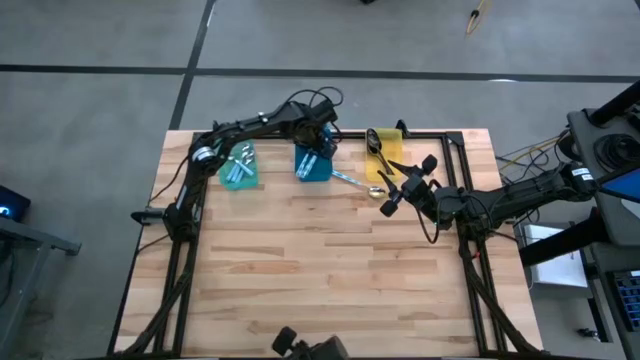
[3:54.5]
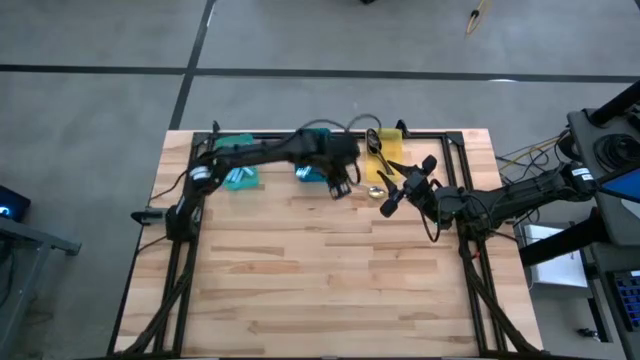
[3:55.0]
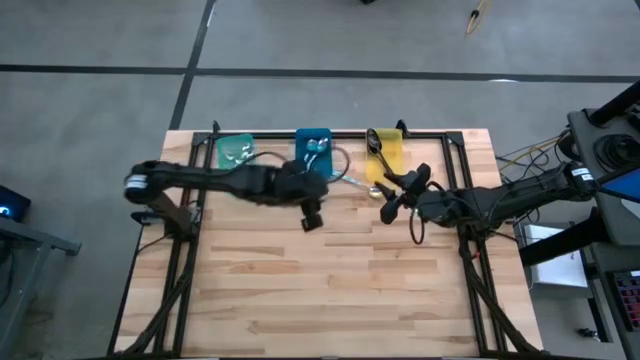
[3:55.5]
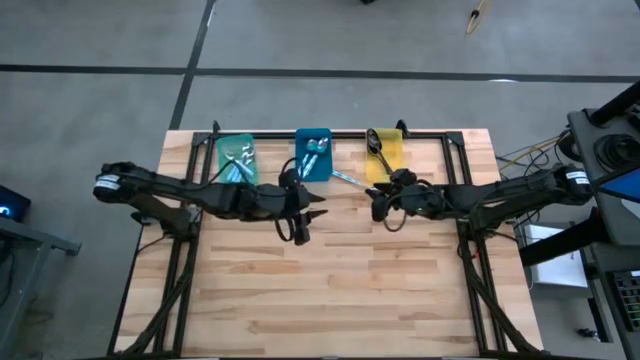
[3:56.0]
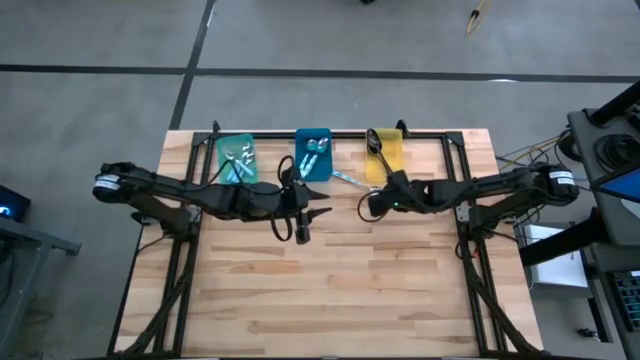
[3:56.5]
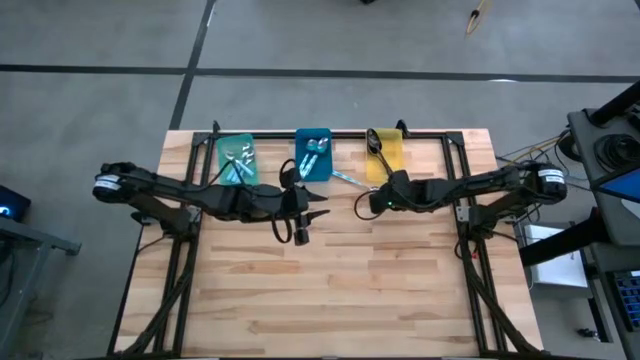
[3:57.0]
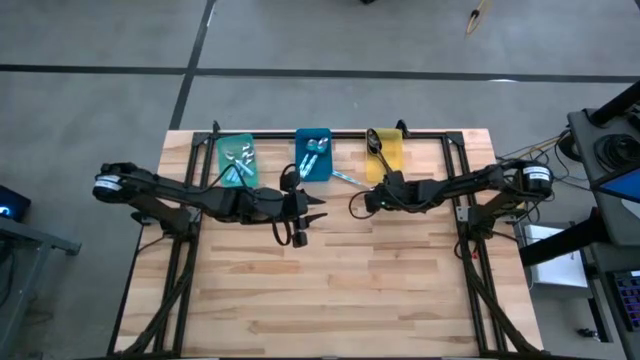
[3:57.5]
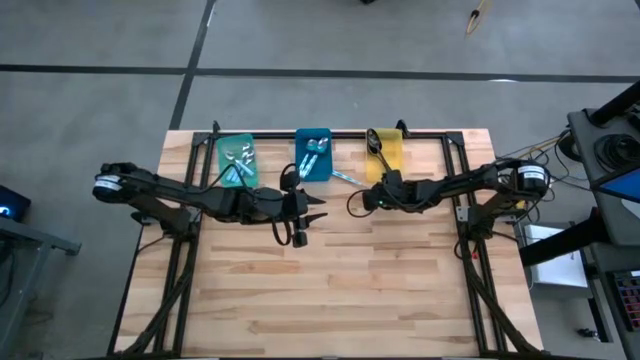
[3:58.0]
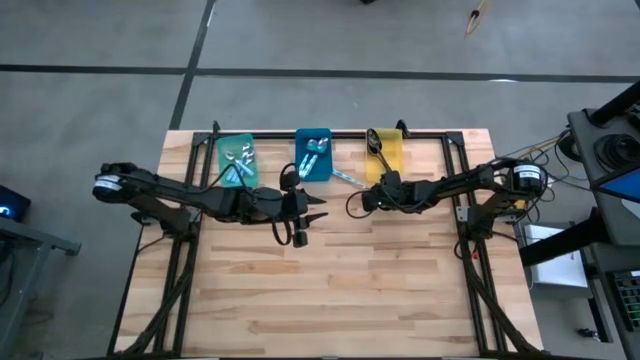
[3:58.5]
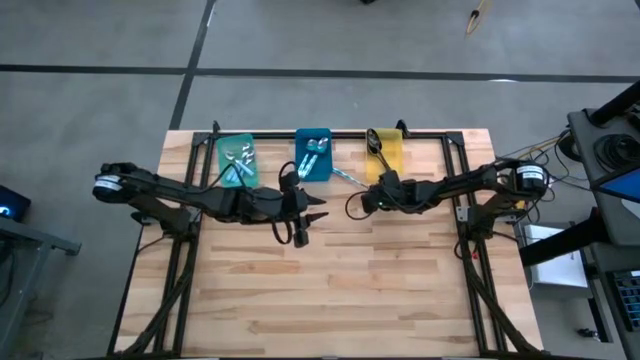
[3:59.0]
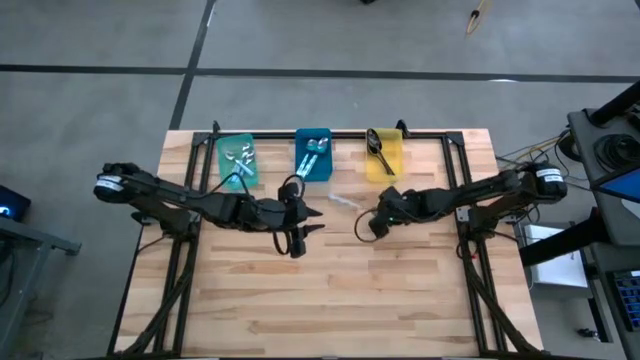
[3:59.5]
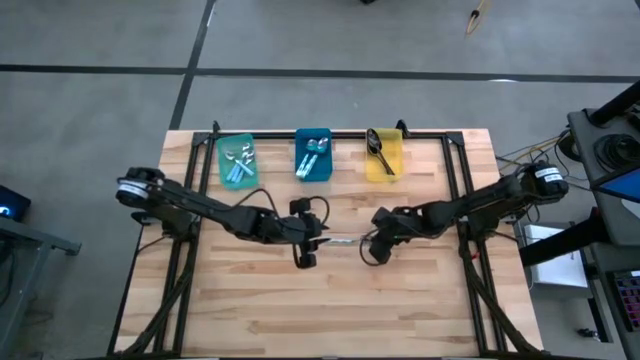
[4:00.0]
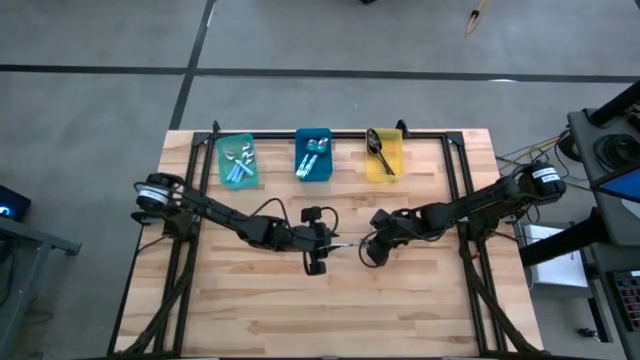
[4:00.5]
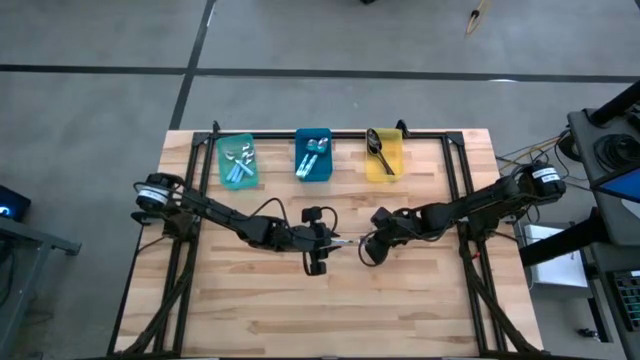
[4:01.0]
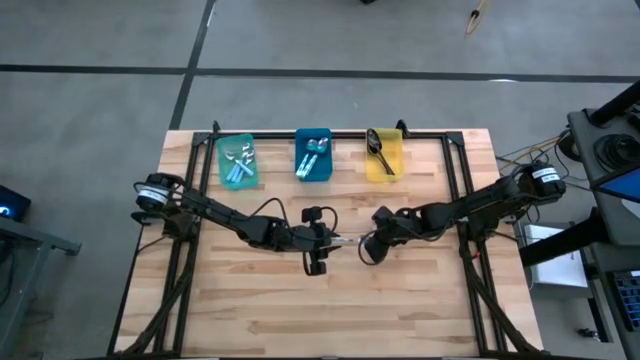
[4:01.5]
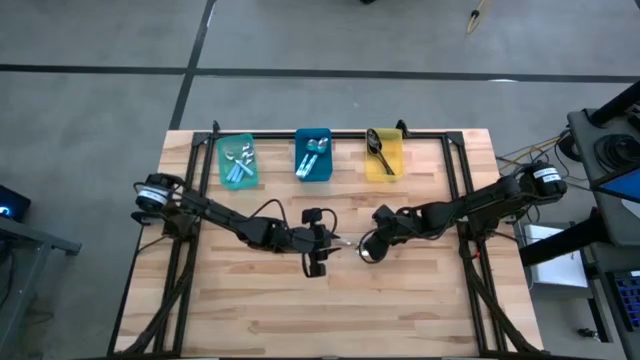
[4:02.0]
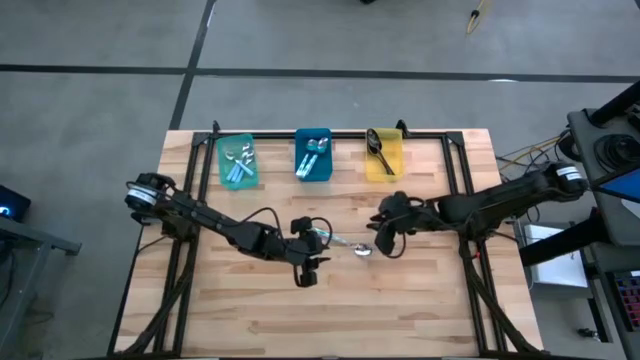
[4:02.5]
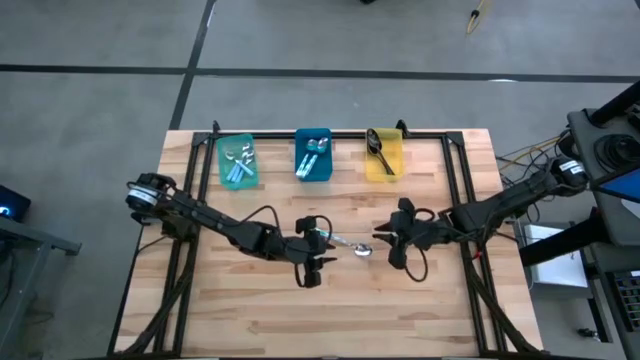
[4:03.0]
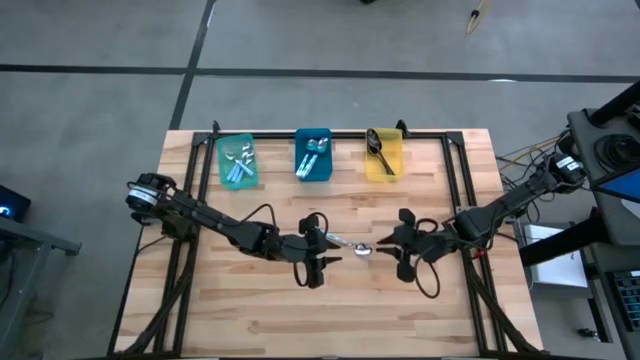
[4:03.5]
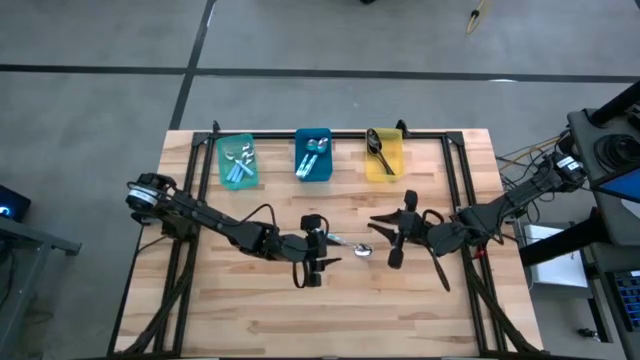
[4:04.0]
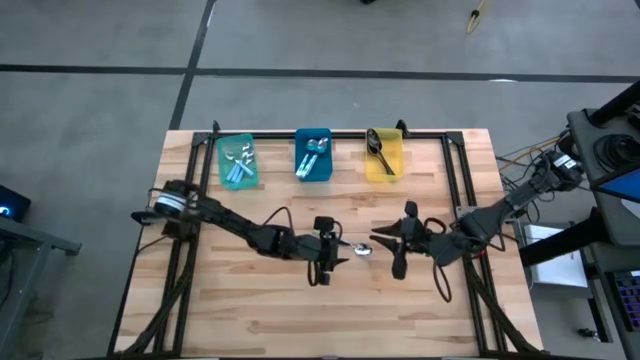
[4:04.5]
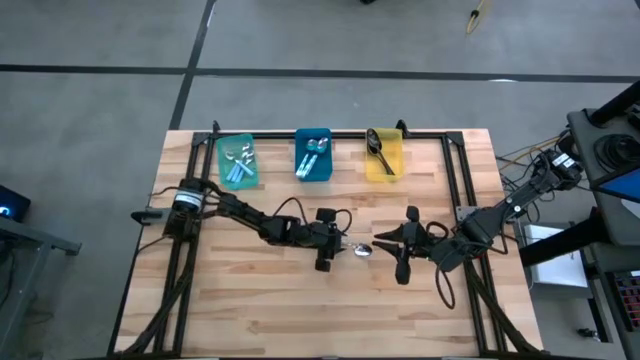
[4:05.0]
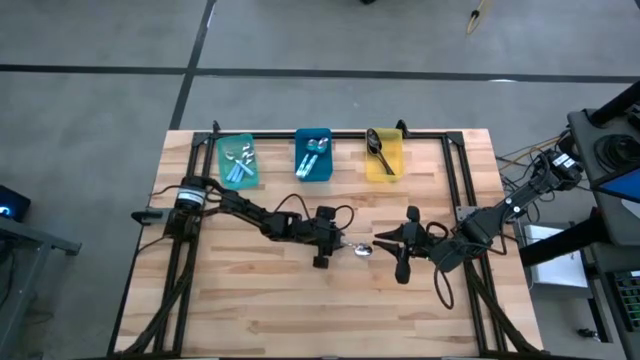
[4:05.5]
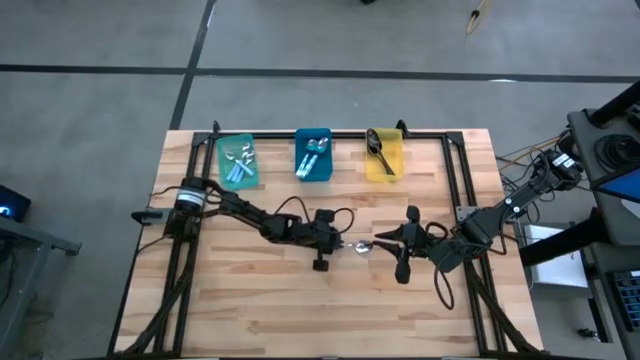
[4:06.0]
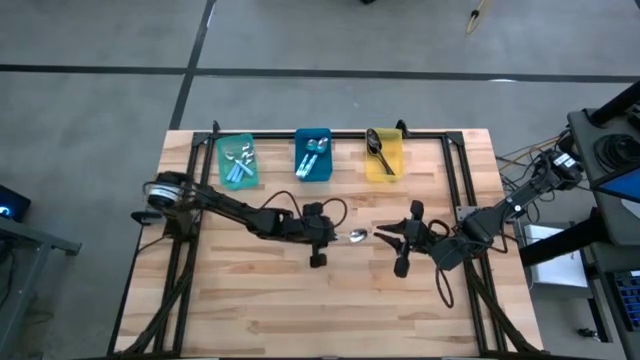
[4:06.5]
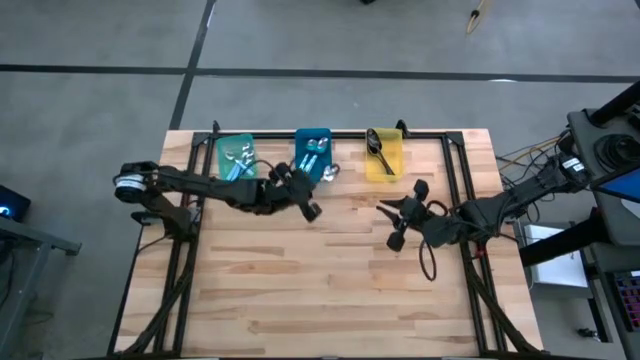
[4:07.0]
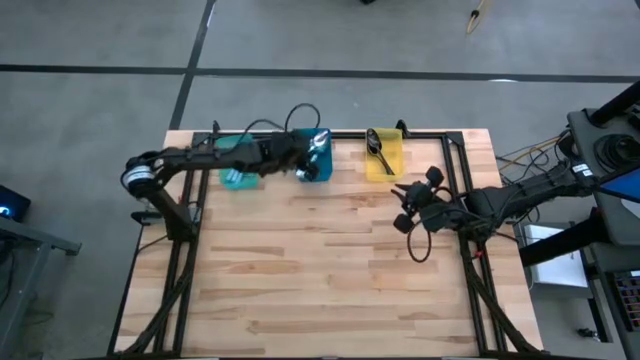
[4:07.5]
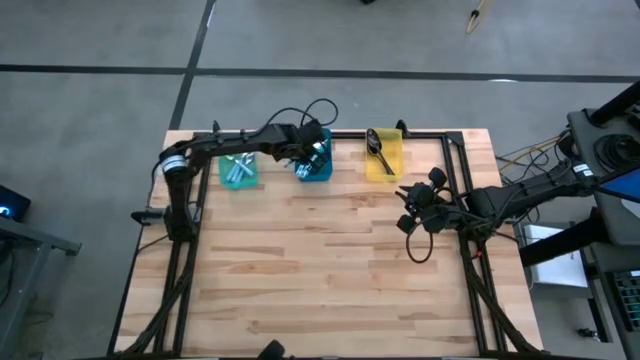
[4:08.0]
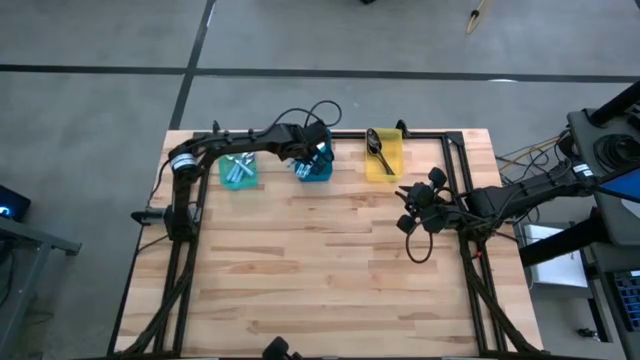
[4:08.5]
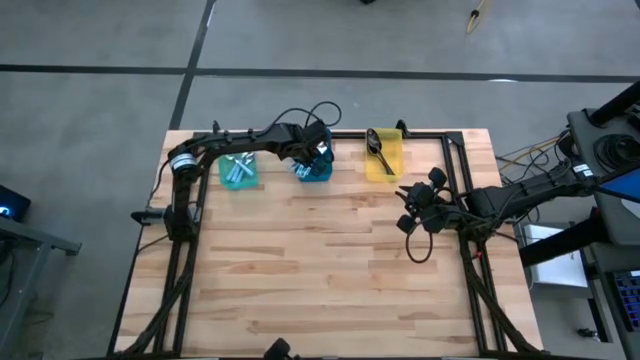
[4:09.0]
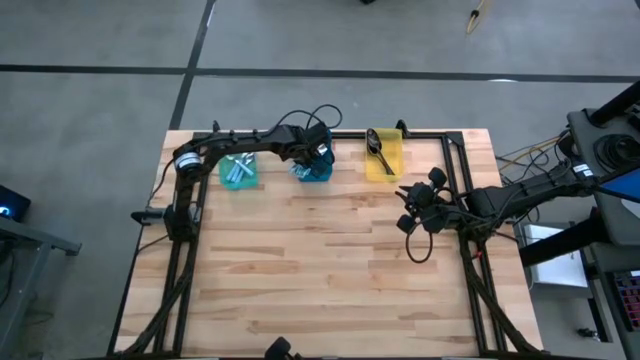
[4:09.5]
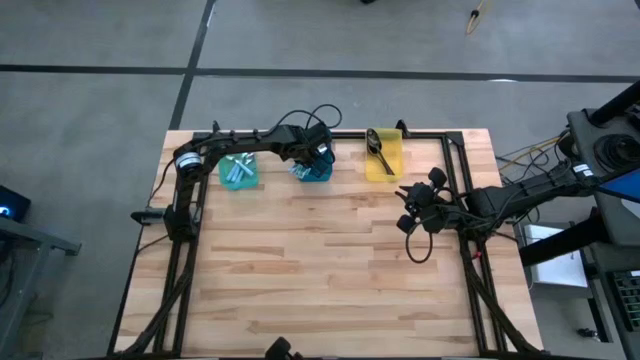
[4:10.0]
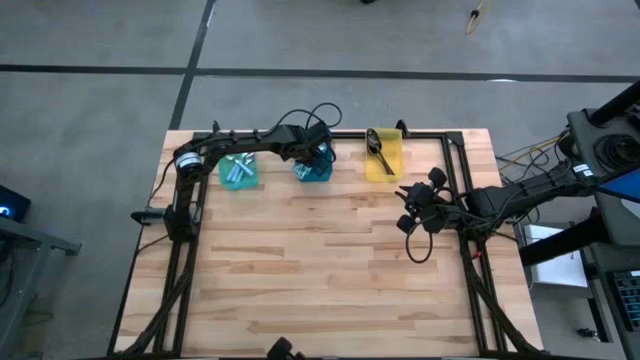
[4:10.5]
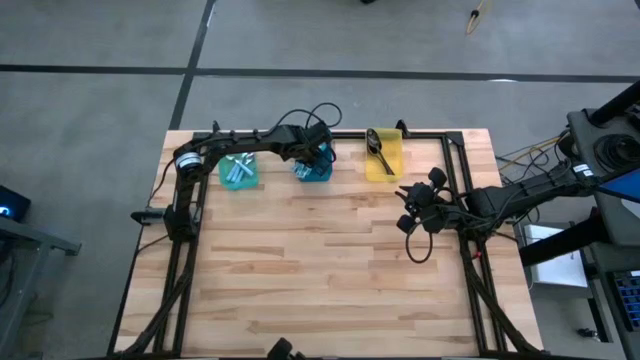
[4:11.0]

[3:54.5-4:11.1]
Task: Sort silverware by color (type)
Put the white-blue spoon into the blue bin

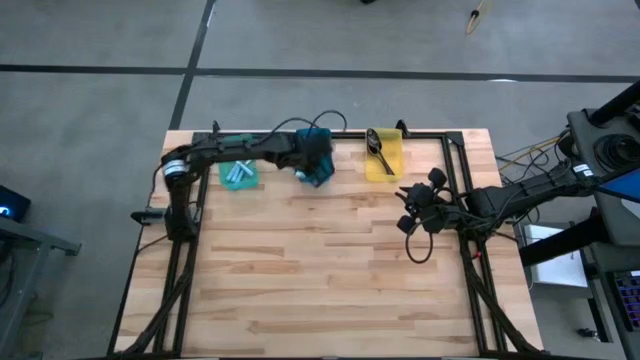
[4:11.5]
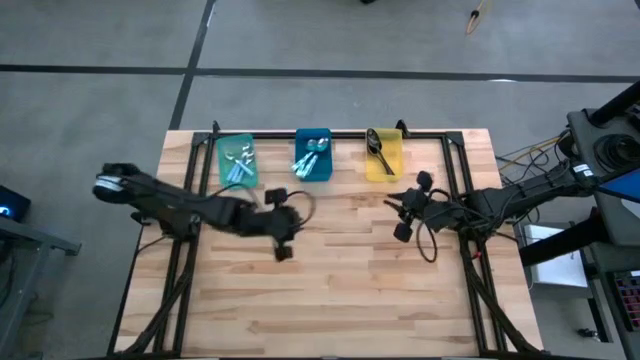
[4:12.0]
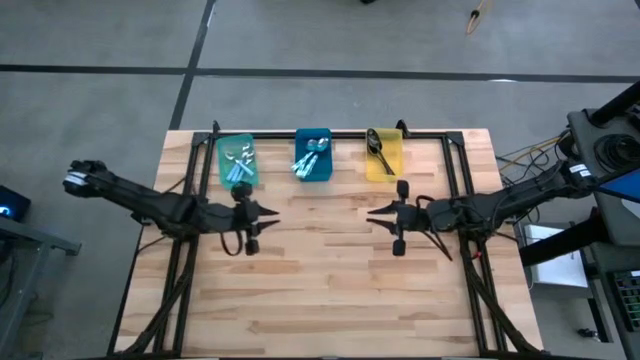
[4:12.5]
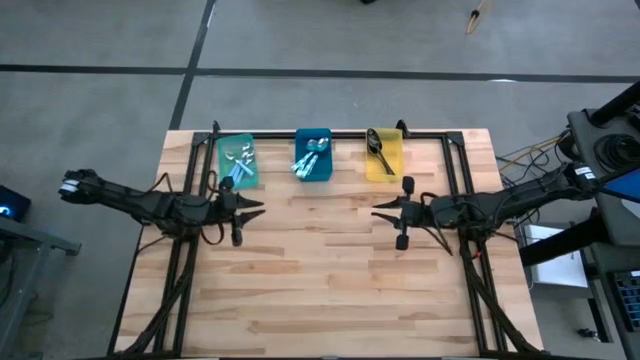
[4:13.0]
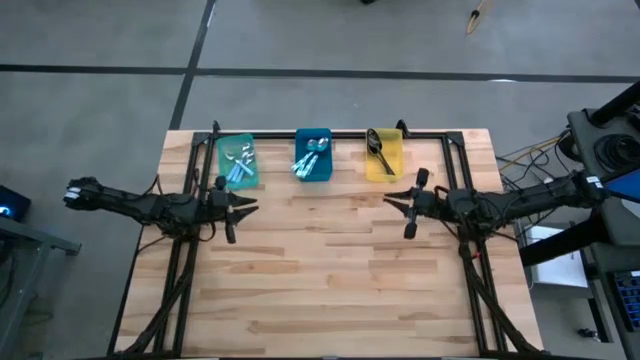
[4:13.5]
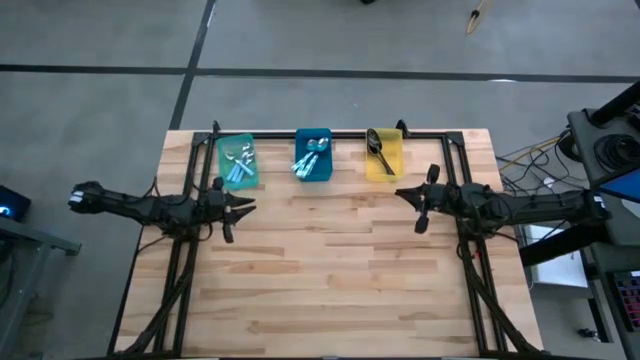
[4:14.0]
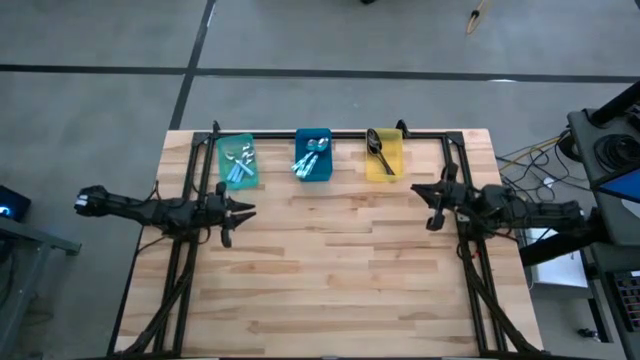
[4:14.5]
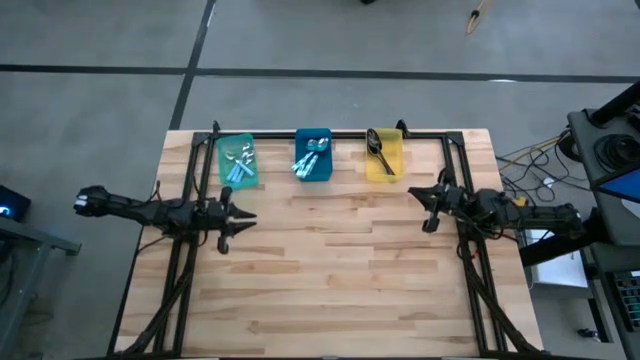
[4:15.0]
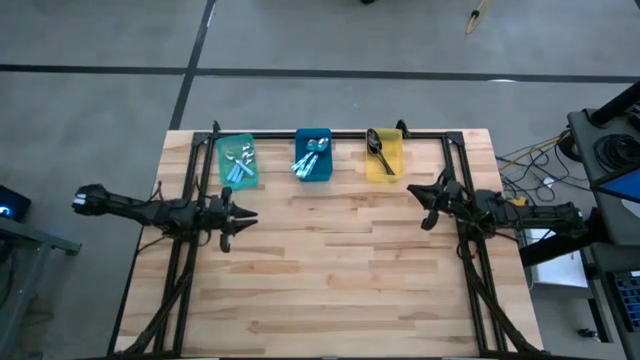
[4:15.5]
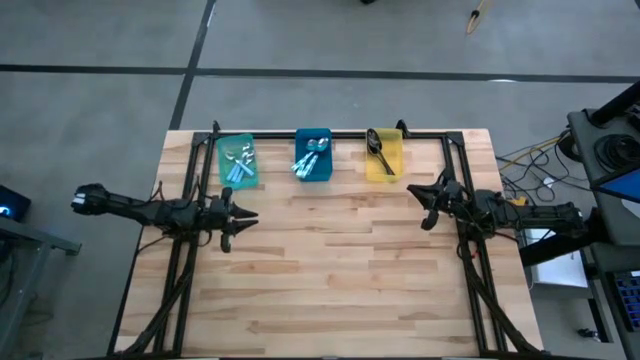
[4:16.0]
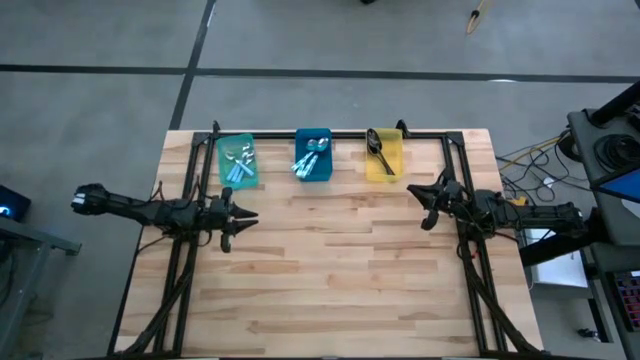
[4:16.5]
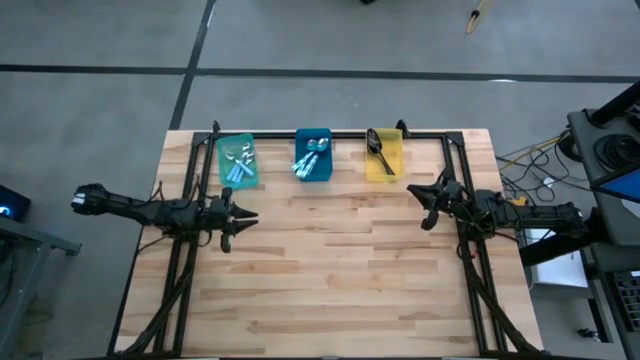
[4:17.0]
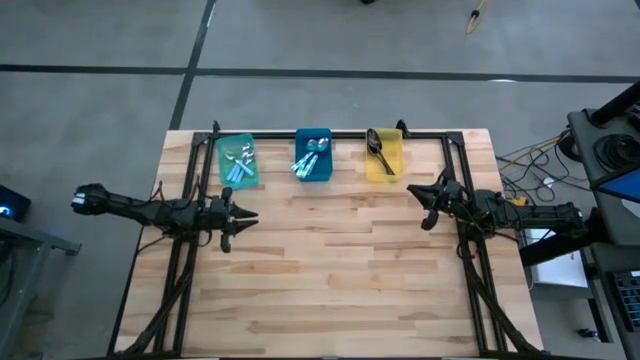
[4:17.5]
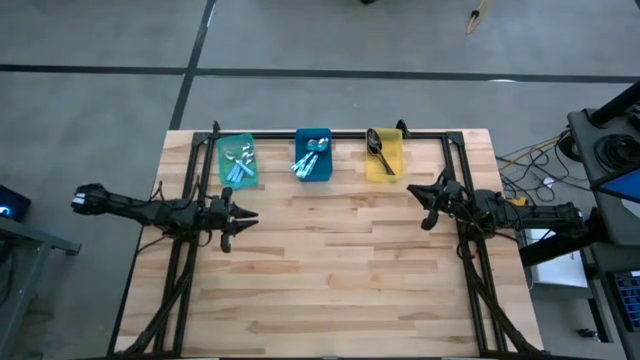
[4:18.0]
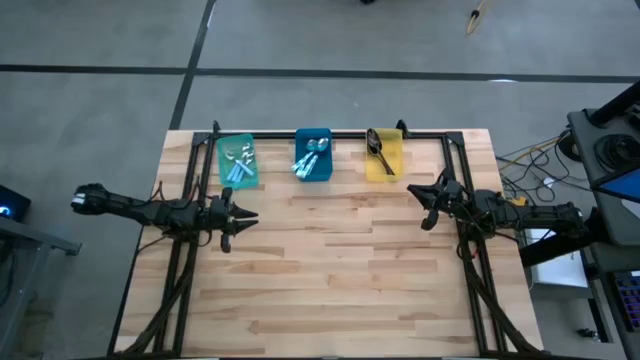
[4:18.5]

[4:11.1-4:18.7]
Return to Home Position
